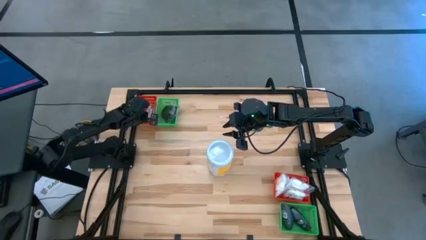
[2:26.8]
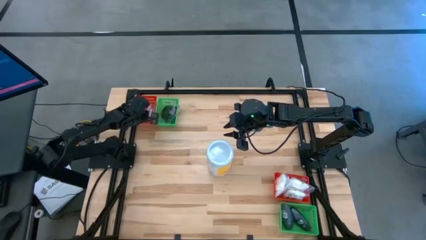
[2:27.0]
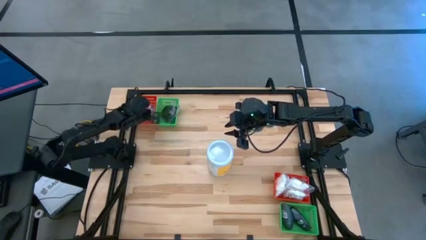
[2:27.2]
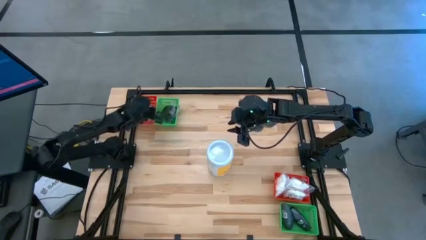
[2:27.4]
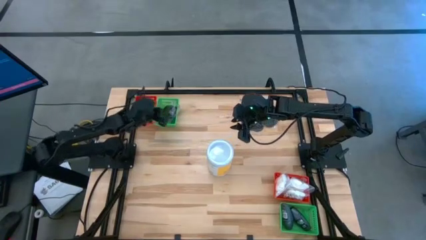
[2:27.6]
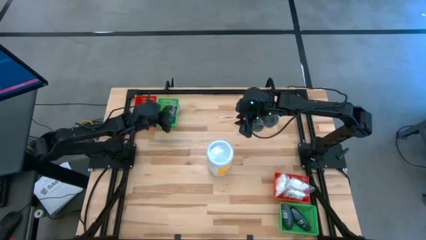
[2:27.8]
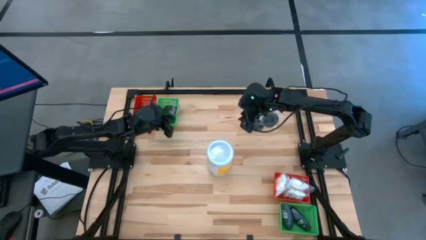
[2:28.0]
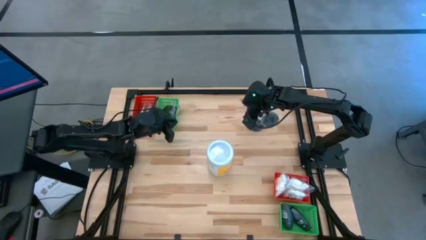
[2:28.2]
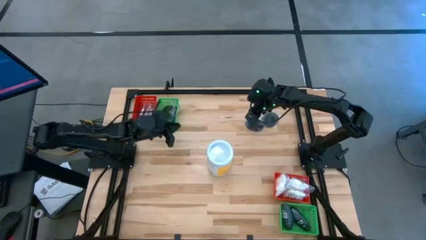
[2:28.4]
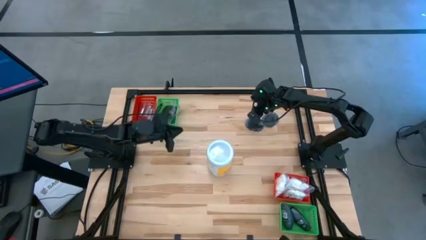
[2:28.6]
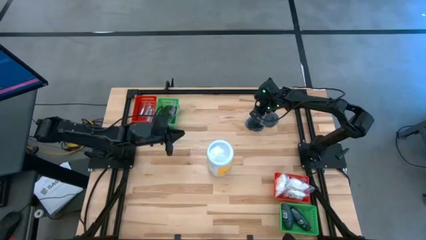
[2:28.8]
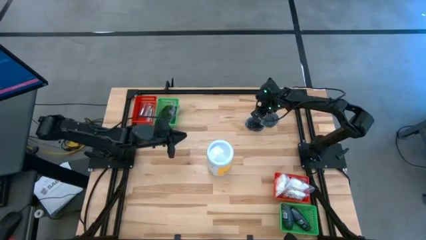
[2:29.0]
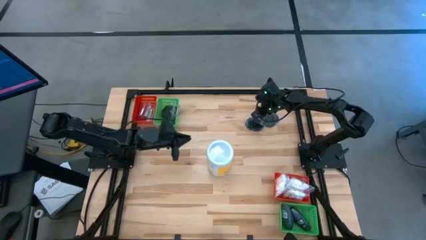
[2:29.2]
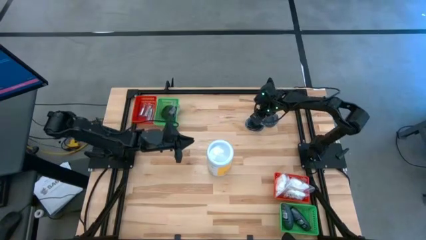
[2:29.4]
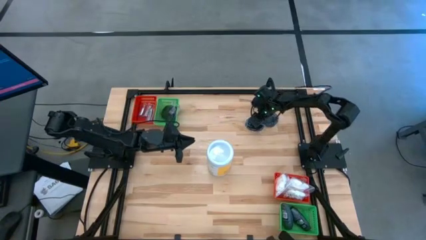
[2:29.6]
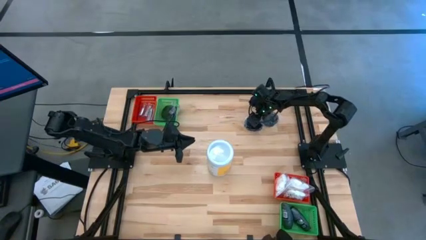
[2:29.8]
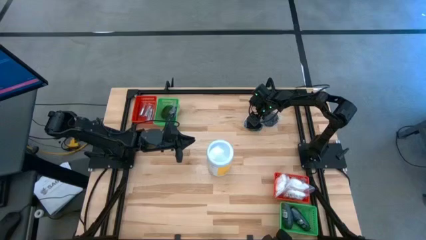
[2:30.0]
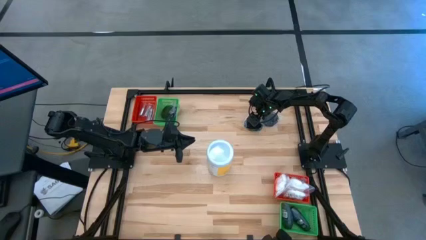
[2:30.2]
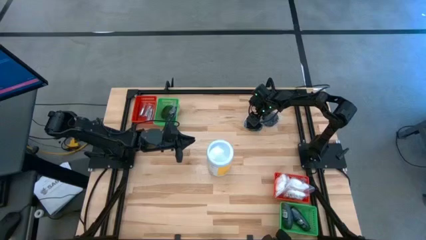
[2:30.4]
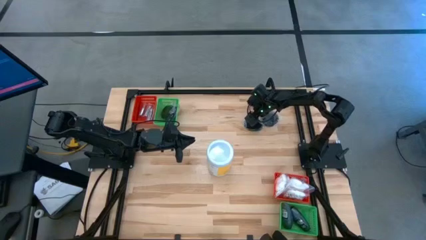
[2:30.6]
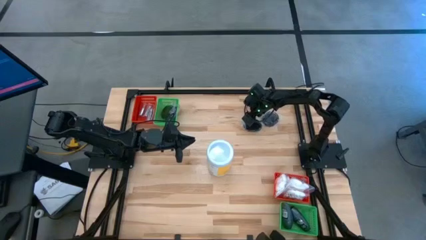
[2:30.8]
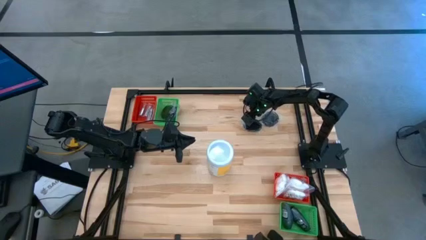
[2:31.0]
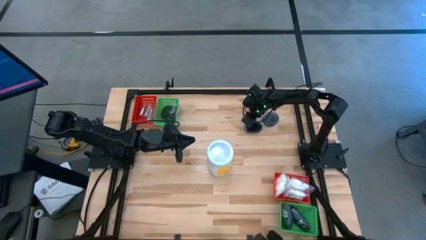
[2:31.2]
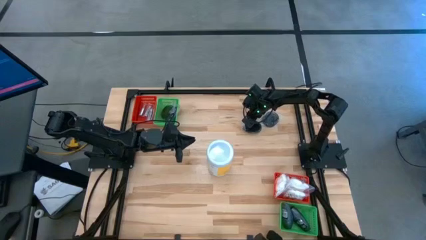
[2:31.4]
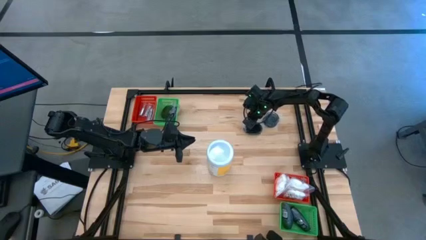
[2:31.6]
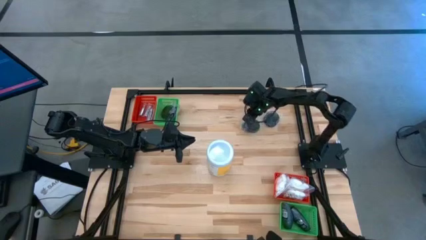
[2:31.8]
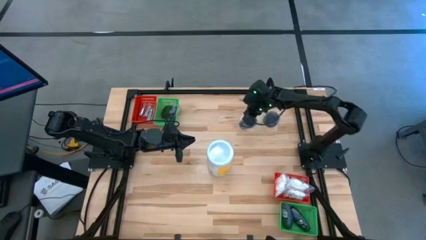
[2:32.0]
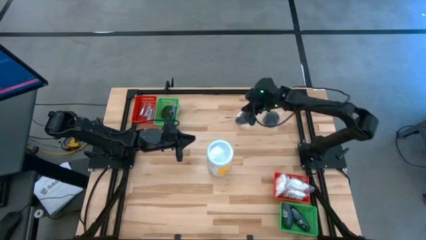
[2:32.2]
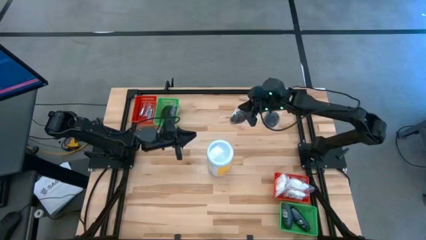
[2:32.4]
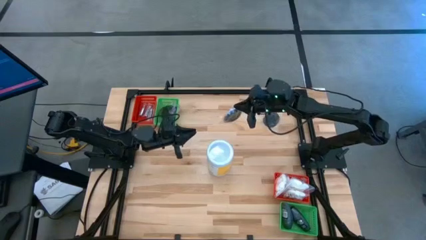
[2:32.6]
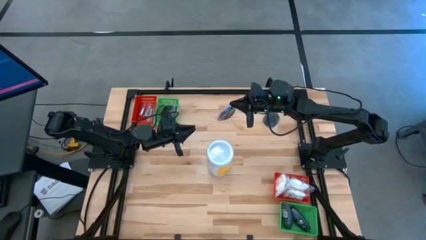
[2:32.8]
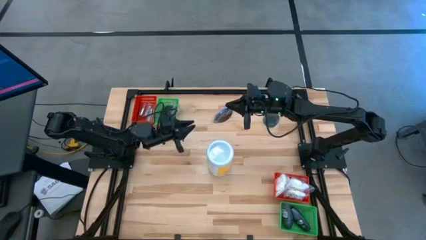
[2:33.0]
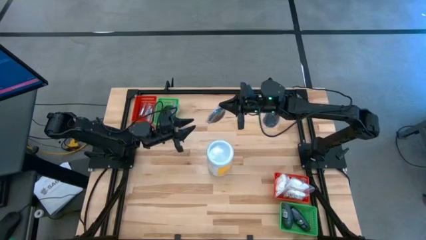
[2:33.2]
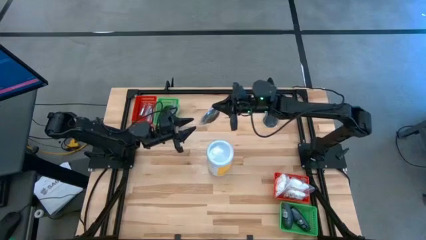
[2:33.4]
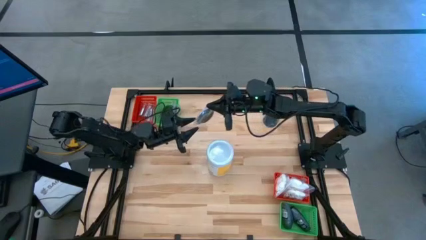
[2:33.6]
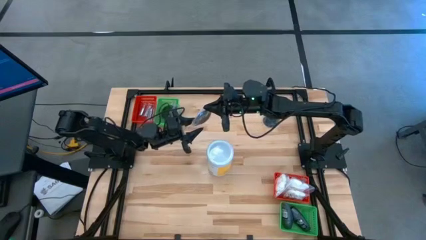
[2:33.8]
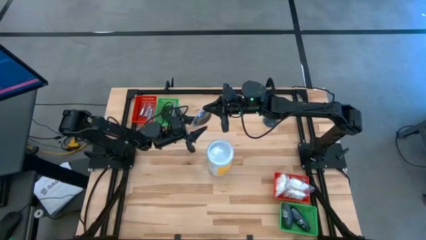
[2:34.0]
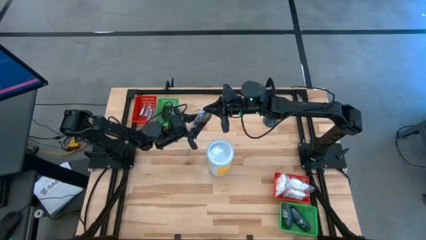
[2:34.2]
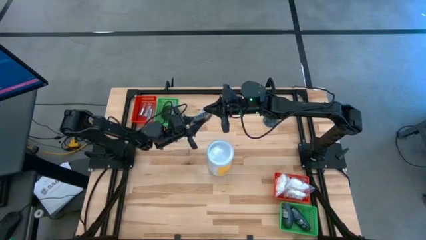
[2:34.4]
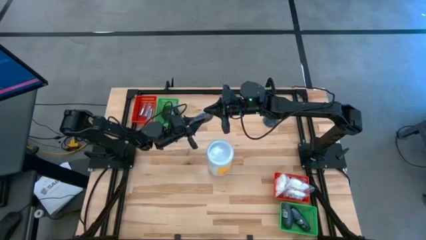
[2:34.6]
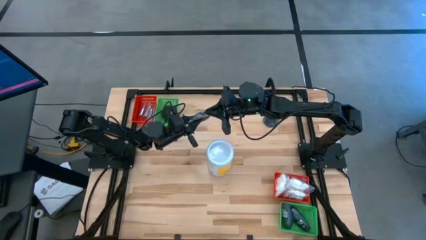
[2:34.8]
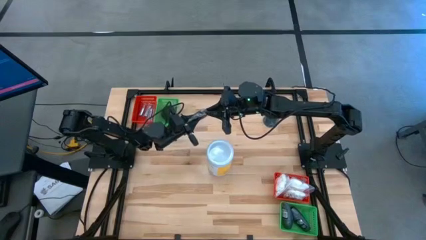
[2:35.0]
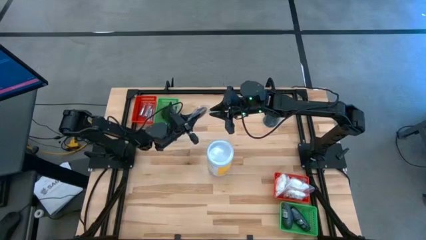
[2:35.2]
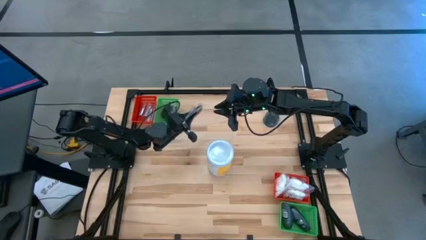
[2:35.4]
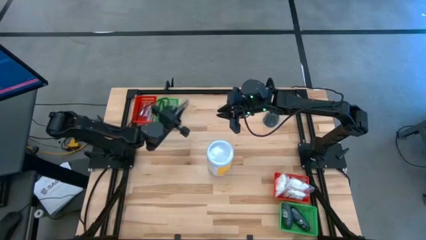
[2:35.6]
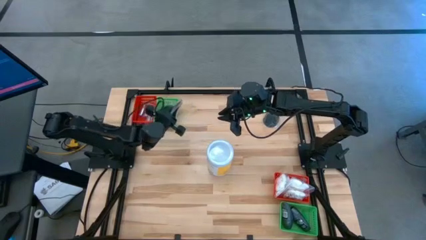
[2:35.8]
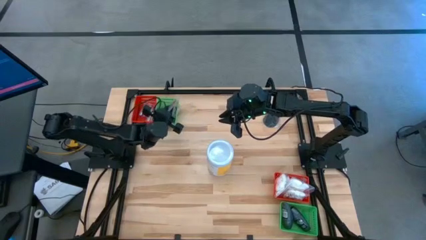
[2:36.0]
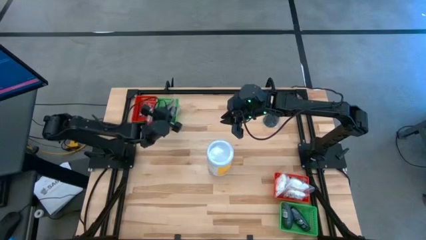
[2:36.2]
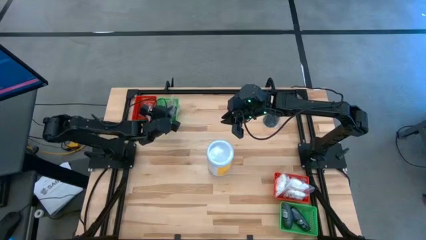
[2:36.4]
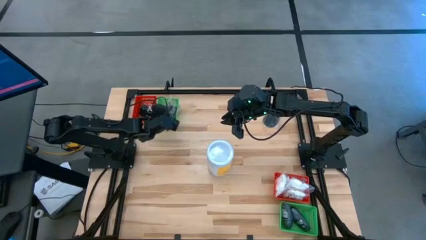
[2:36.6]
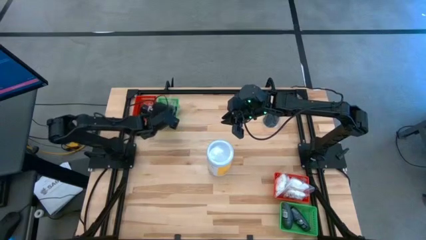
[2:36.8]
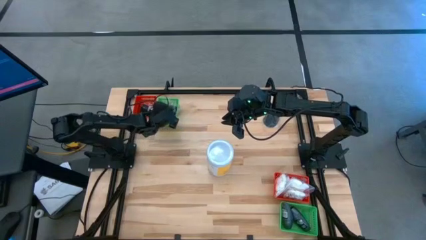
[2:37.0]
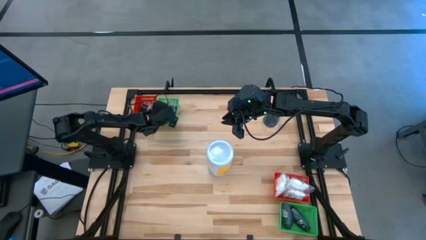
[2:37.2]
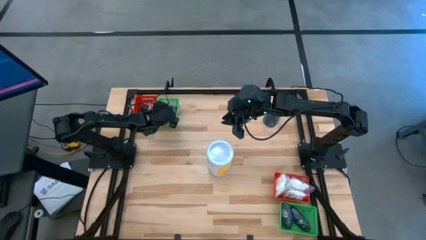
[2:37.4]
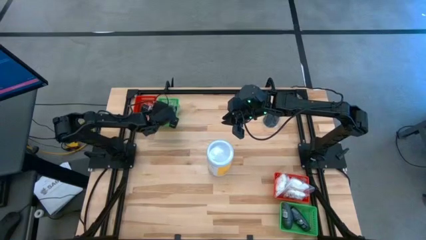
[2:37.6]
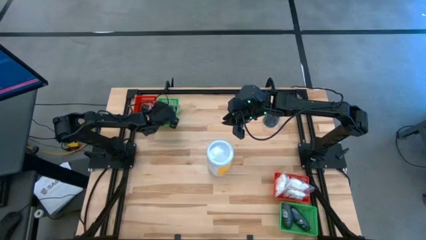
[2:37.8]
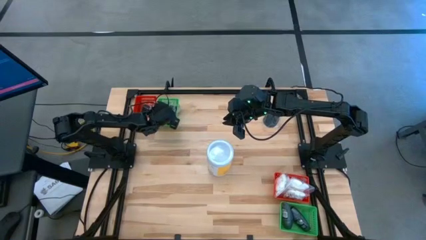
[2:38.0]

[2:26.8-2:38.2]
Task: Pick & Place Travel size toiletries
Put the black hairbrush into the top green basket

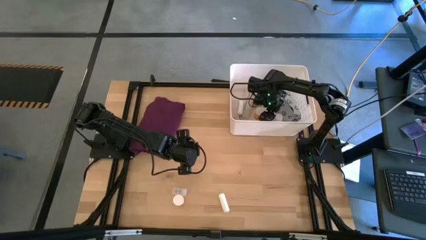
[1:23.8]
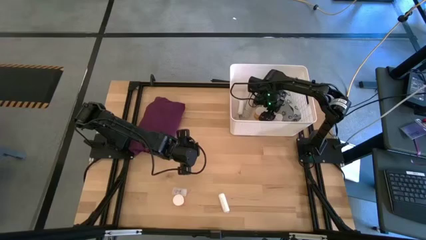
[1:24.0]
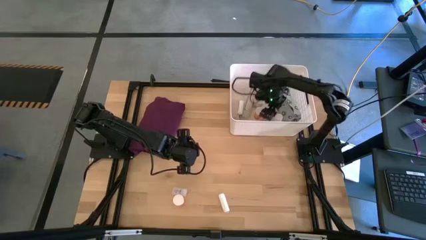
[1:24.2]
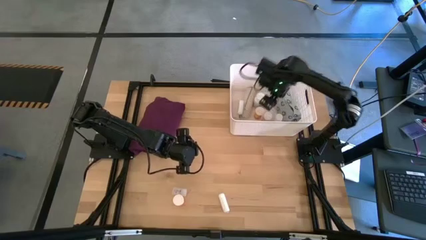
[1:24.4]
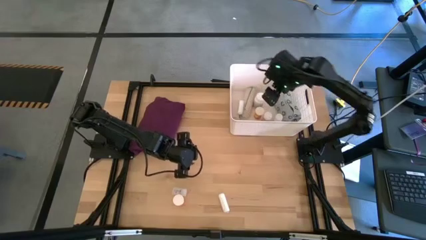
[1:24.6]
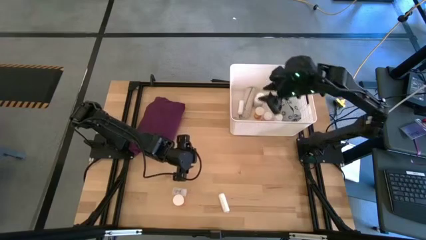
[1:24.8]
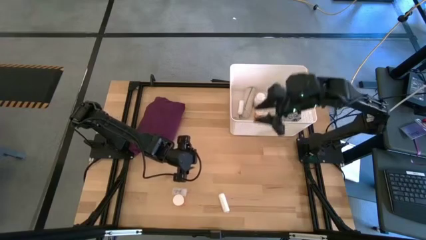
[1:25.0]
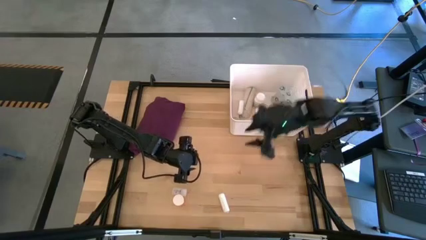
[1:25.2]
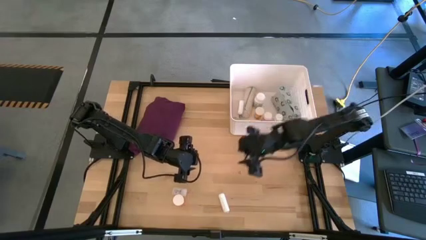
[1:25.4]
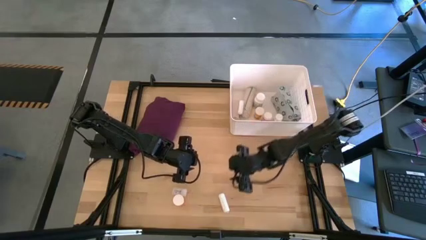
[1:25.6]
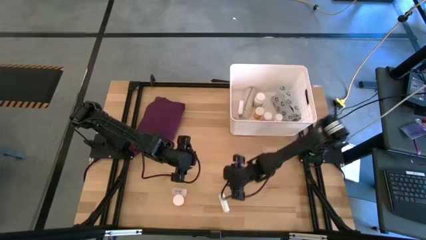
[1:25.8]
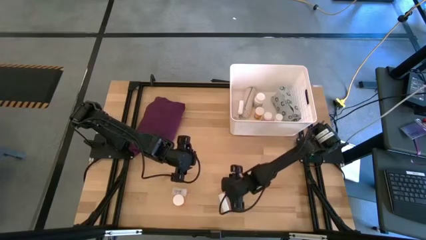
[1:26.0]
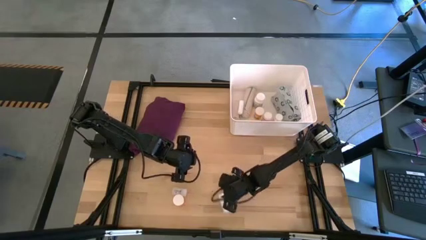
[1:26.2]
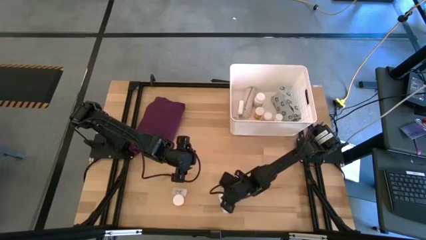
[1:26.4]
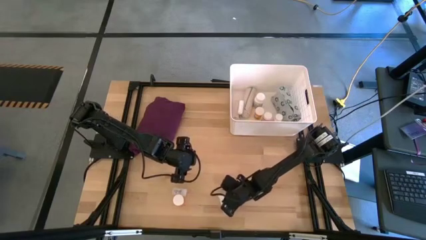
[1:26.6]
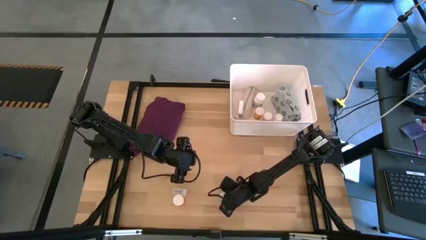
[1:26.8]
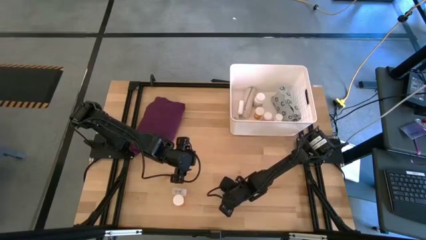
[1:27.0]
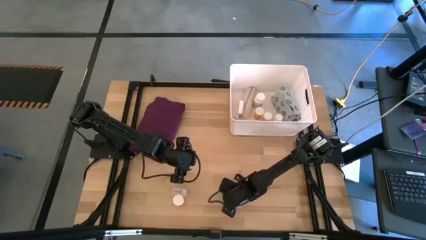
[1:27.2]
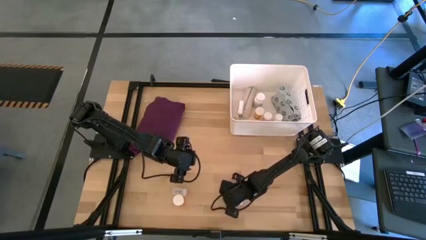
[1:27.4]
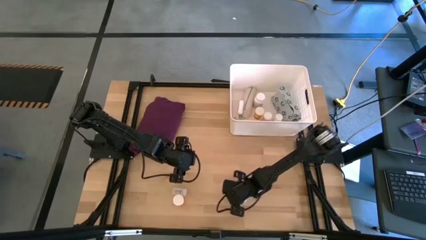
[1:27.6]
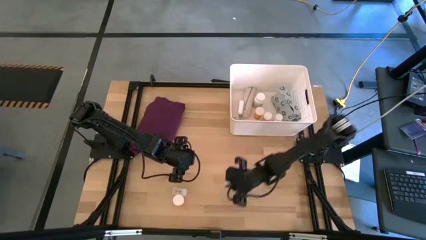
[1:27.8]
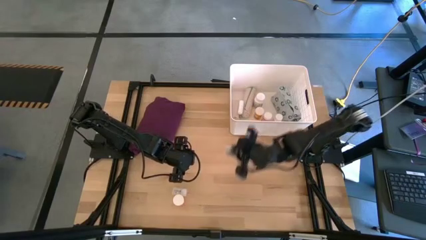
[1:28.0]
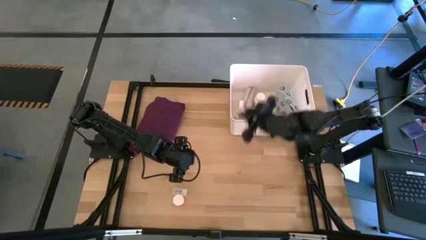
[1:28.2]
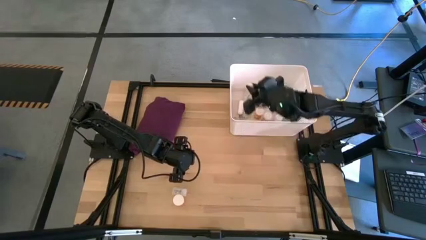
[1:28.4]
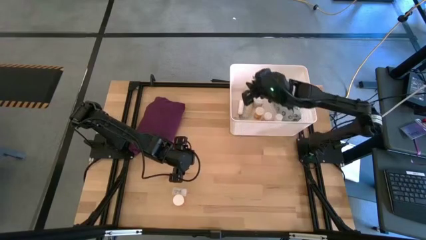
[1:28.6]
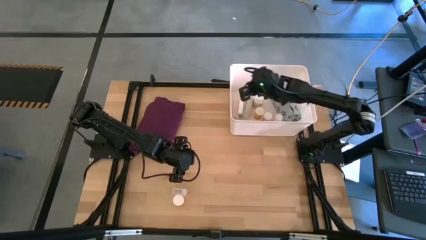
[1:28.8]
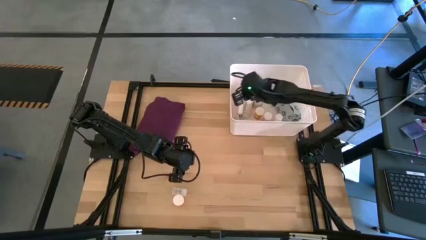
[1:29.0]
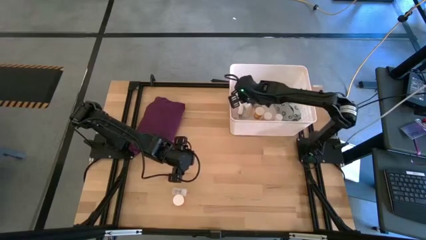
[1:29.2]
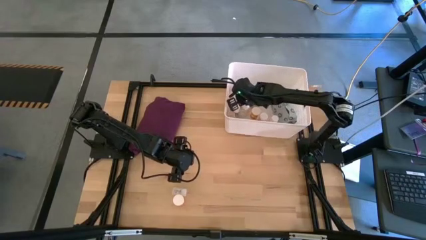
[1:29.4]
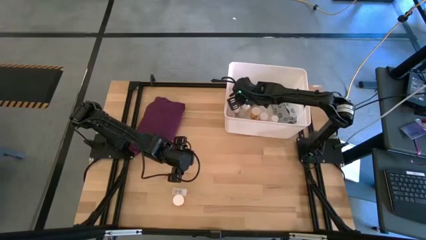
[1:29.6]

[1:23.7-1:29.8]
Task: Pick & place medical supplies in basket/bin
Put the white rolled gauze into the white bin
